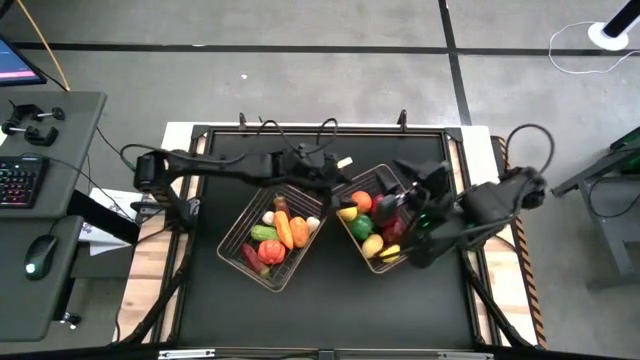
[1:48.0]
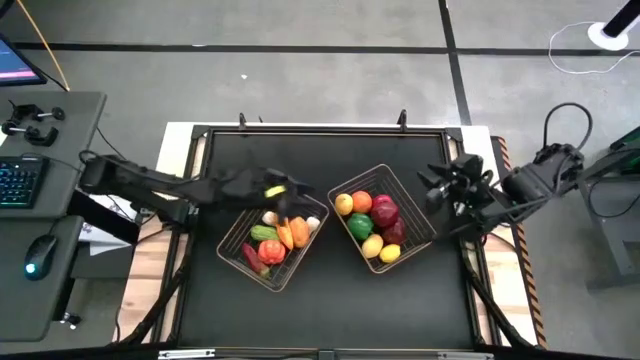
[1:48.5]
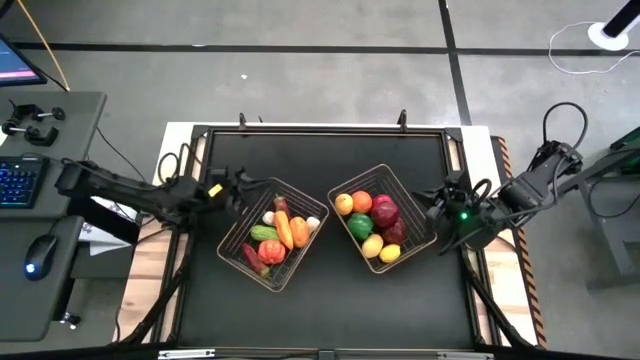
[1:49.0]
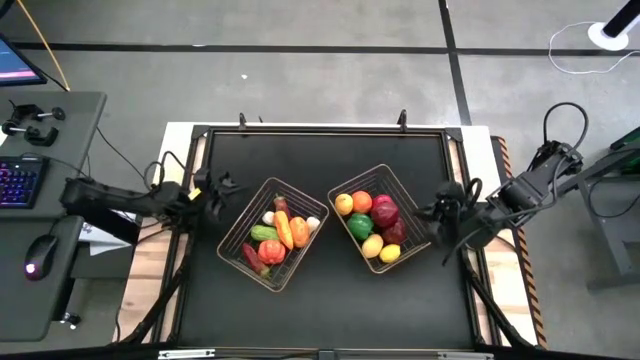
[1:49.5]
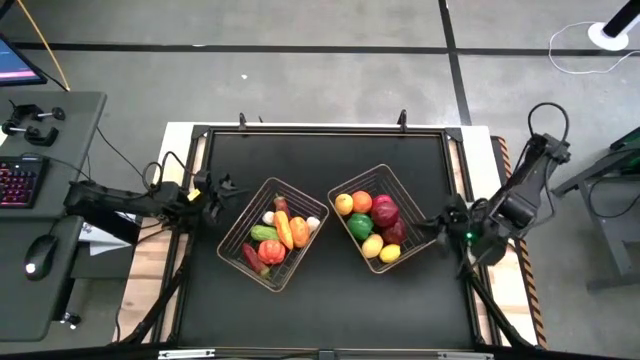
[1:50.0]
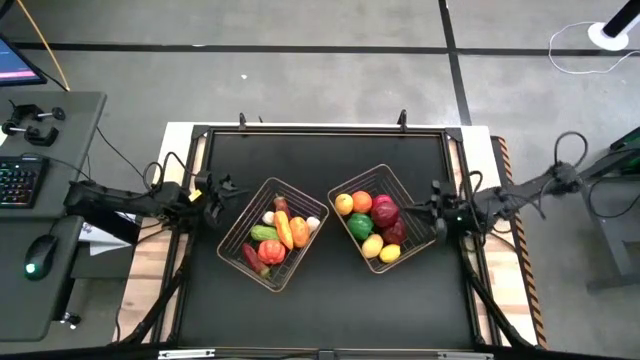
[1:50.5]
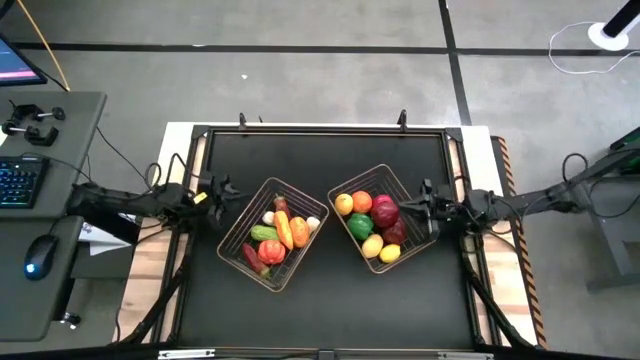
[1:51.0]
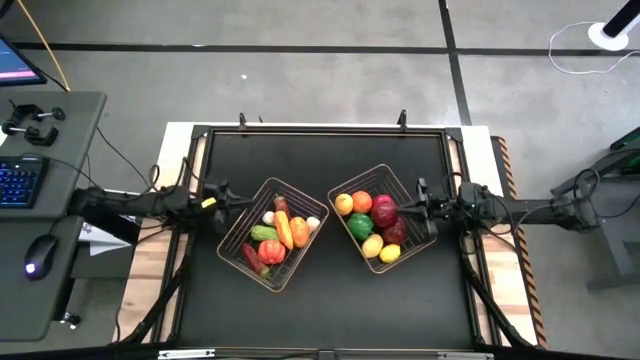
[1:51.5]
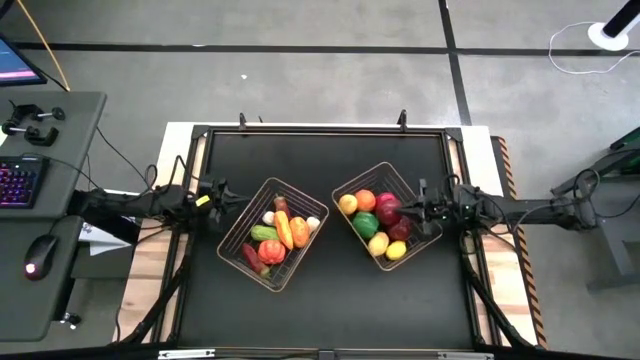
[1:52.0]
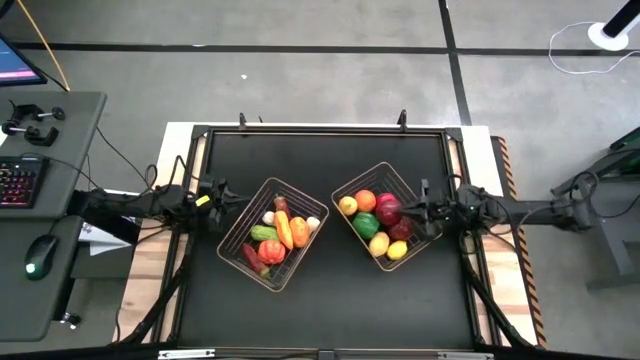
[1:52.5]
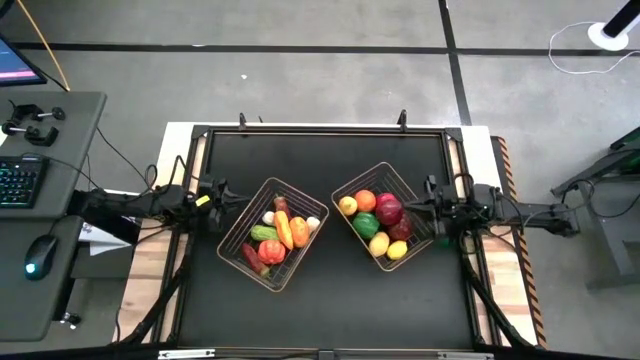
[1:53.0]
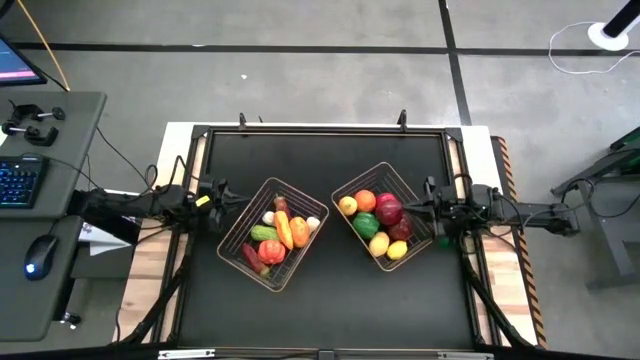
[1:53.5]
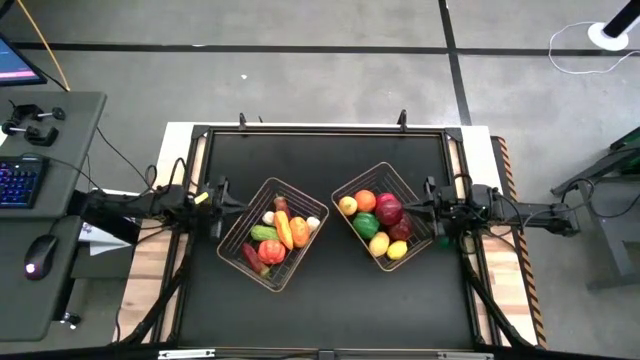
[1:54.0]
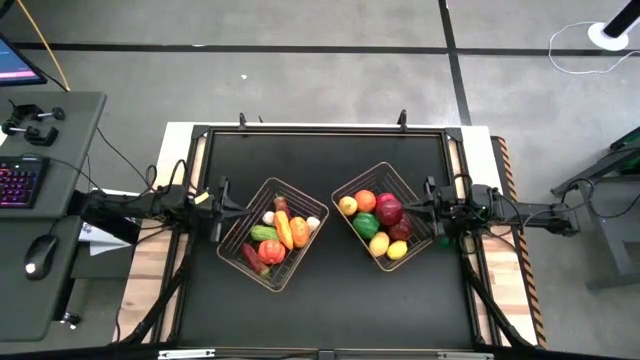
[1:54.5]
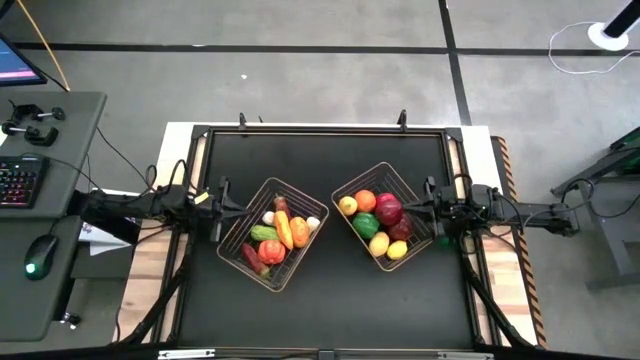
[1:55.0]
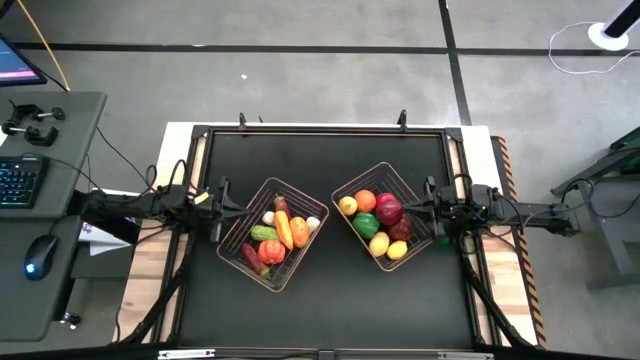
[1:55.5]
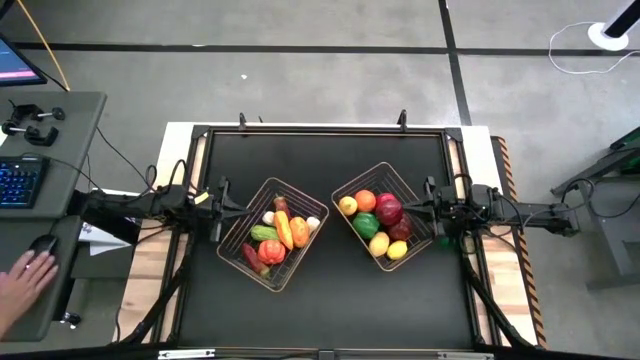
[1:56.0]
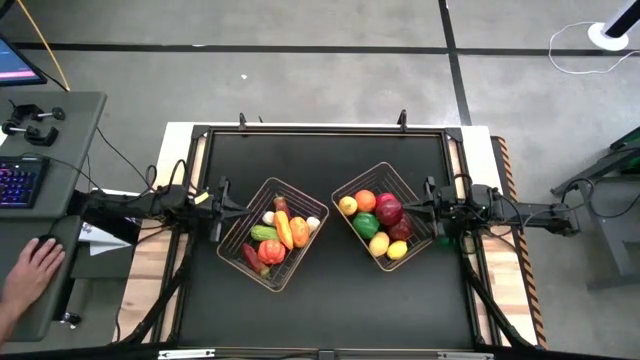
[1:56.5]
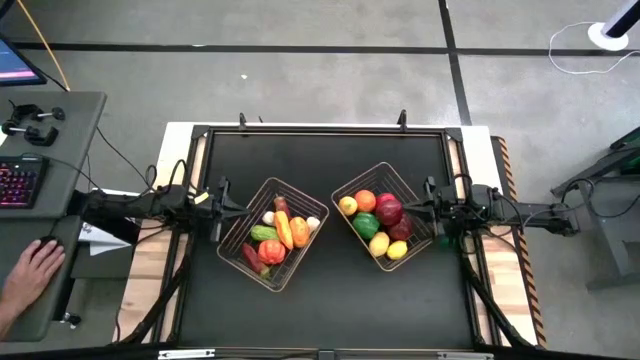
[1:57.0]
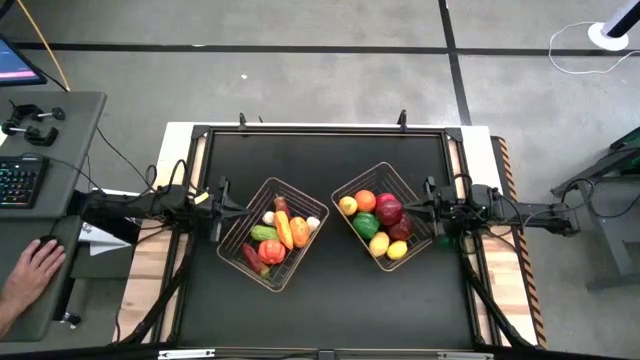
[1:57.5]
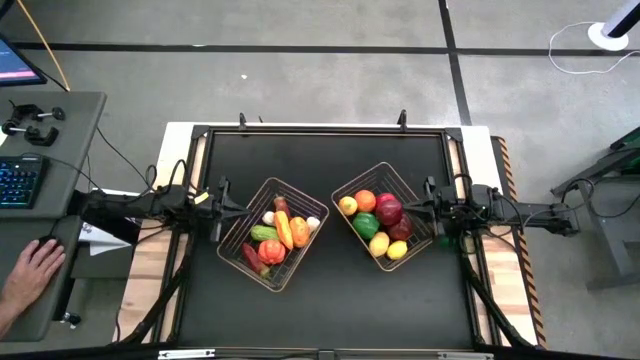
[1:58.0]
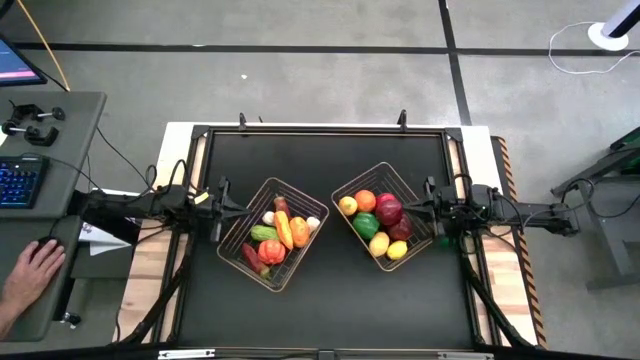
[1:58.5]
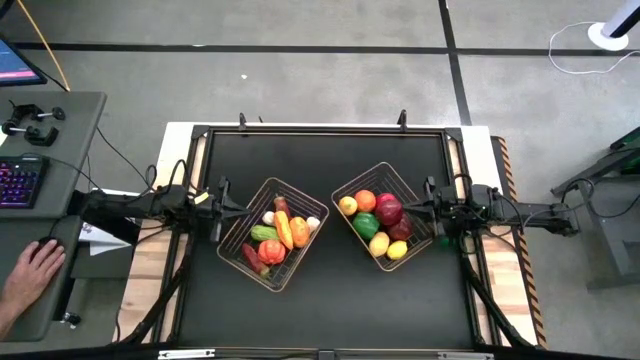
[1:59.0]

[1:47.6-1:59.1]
Task: Sort produce into baskets
Return to Home Position

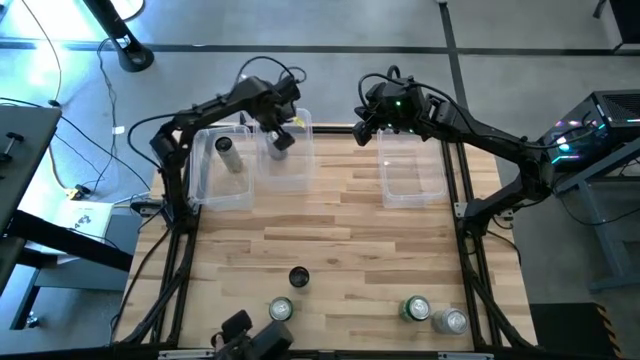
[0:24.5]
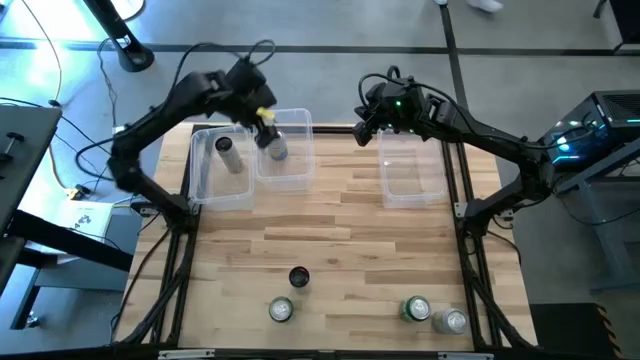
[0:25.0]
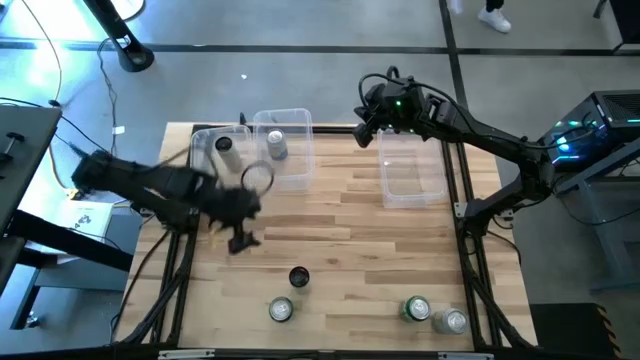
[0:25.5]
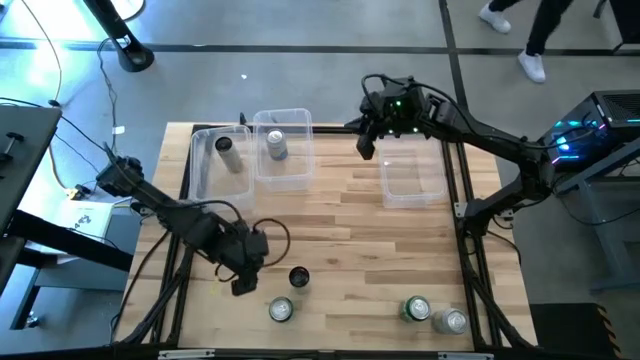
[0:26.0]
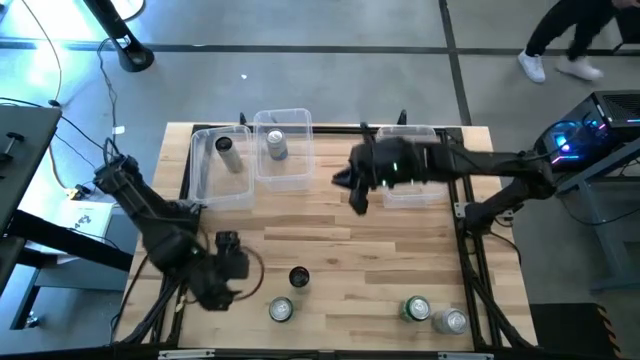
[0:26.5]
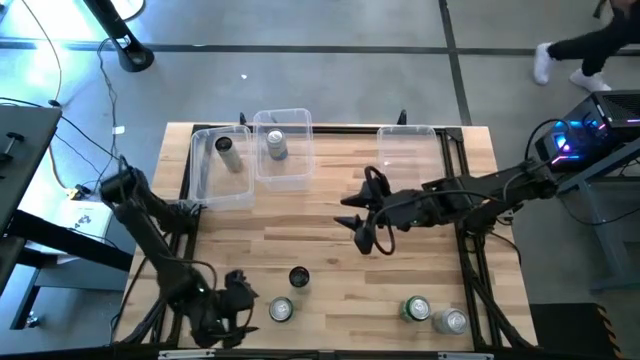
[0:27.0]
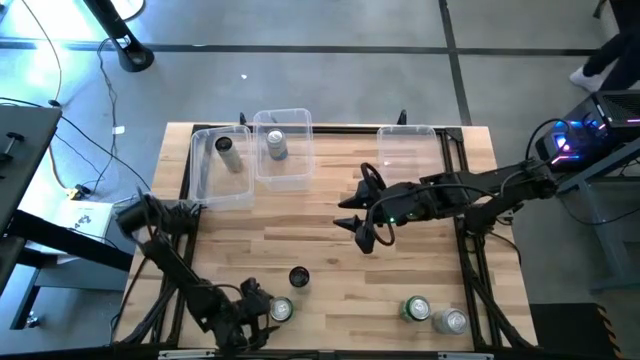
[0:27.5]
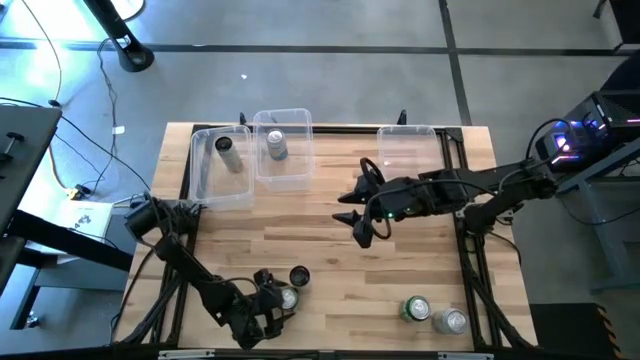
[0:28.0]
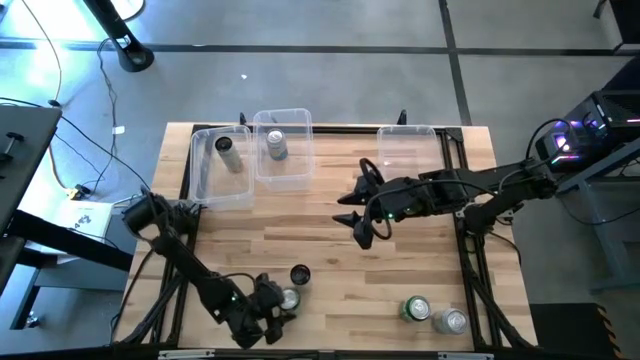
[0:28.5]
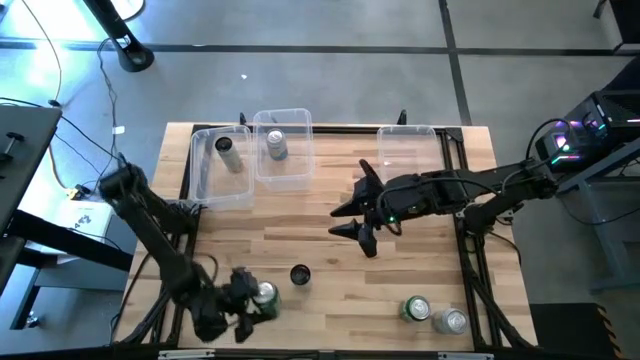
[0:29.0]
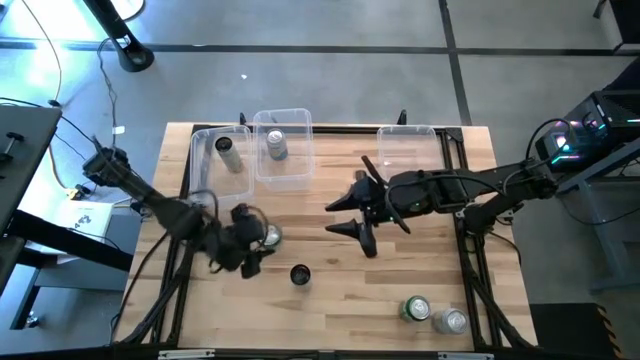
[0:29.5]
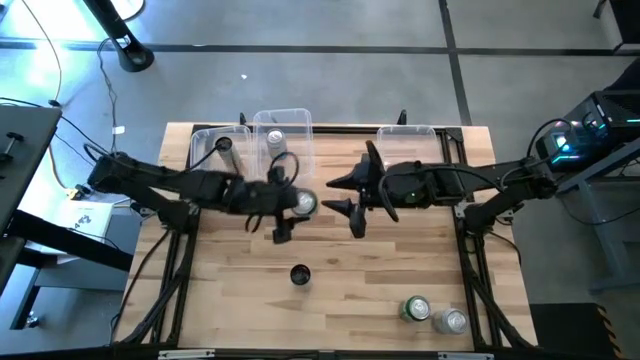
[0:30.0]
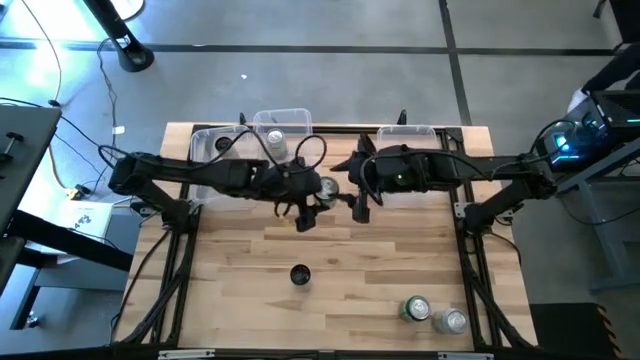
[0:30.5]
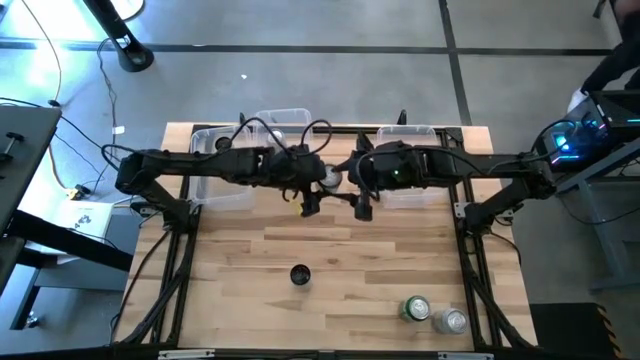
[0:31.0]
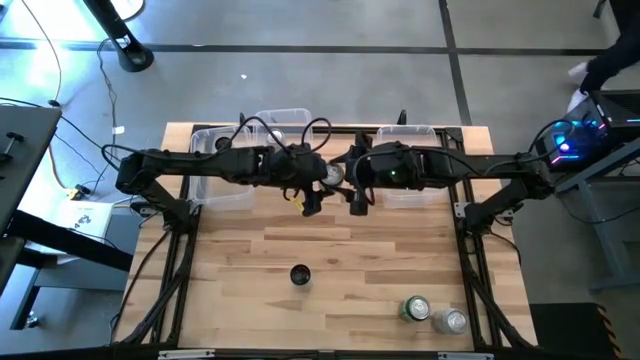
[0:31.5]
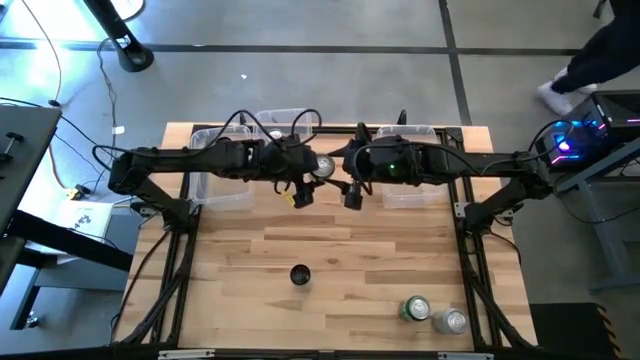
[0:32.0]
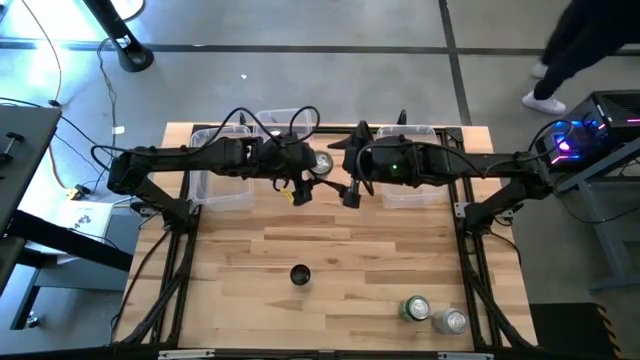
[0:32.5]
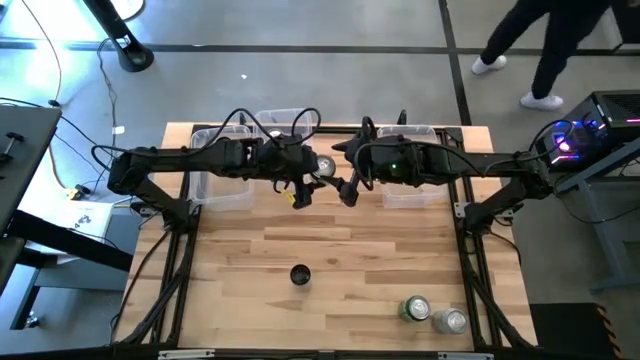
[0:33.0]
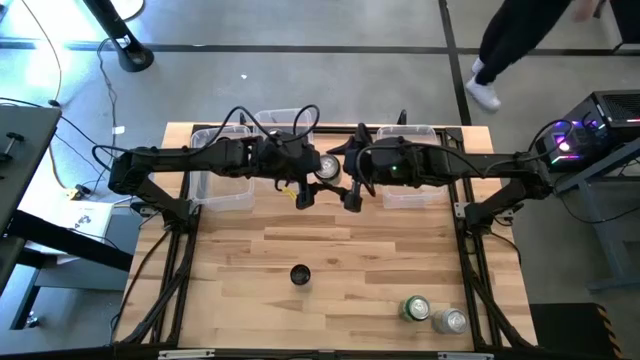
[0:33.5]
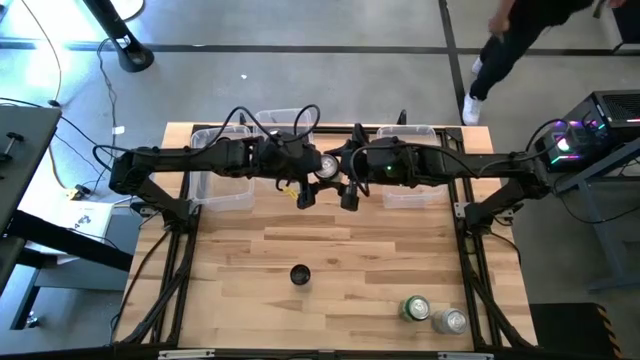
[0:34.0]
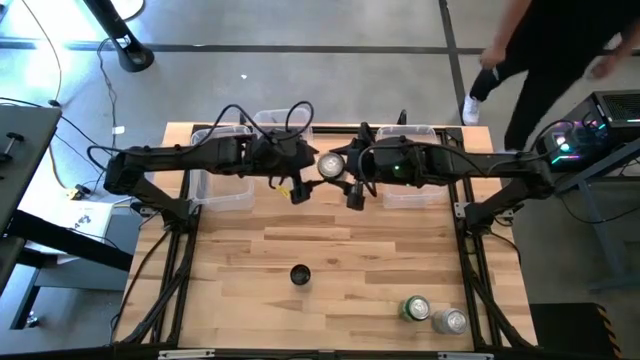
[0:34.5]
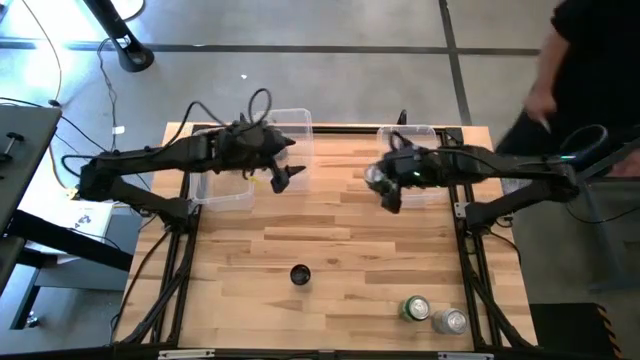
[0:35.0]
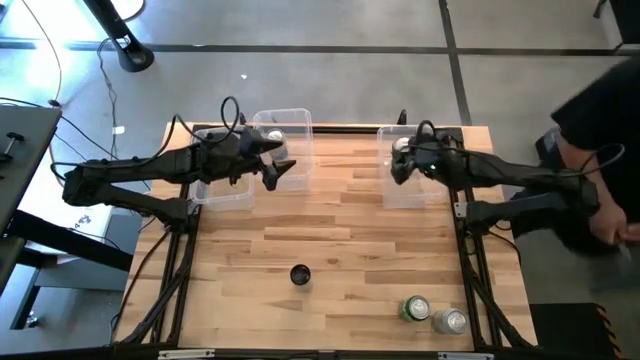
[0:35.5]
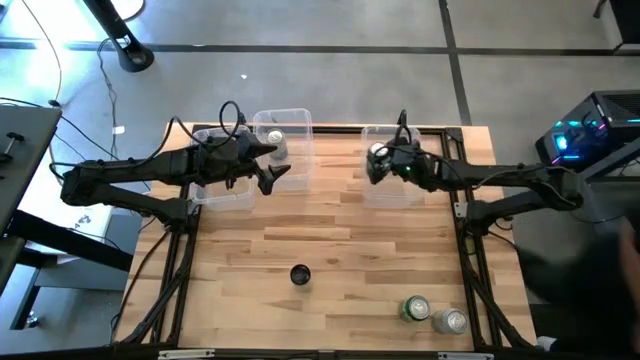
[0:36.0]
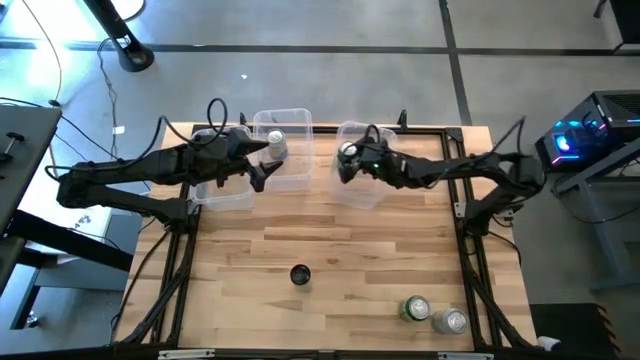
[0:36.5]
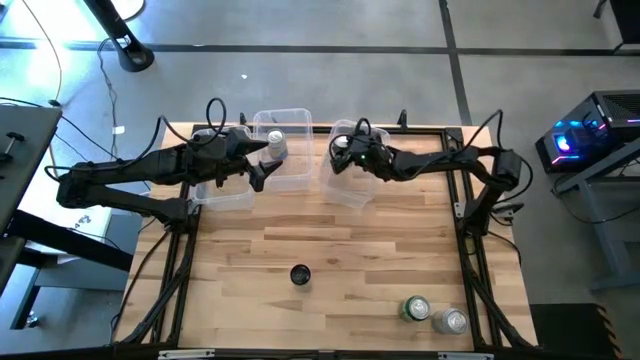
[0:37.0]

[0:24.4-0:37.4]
Task: Sort soda cans
Put the left green soda can into the right transparent bin
